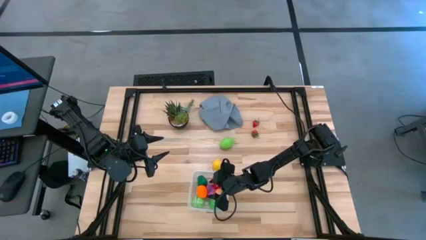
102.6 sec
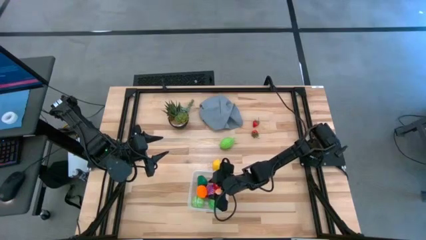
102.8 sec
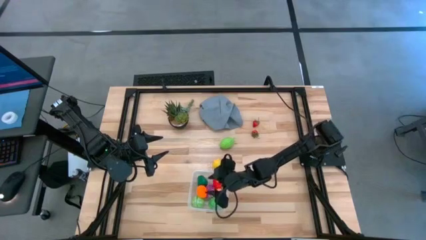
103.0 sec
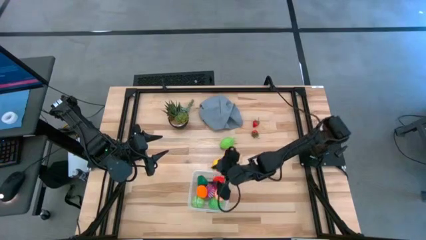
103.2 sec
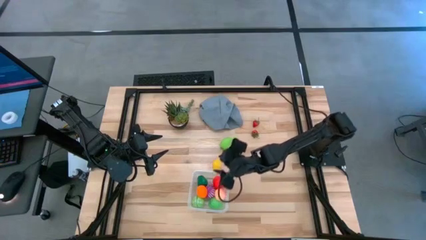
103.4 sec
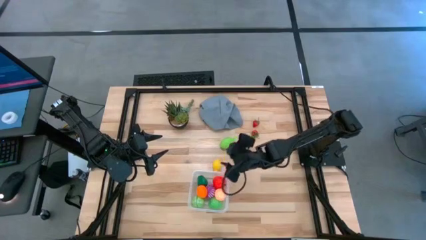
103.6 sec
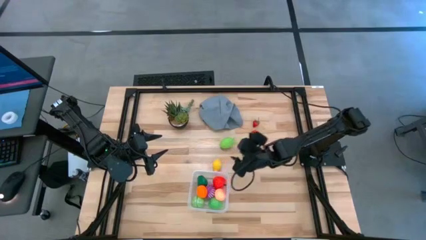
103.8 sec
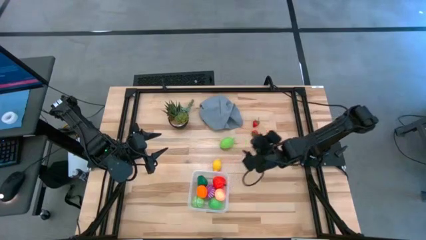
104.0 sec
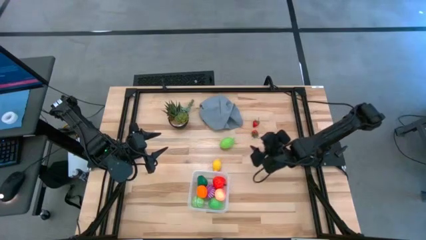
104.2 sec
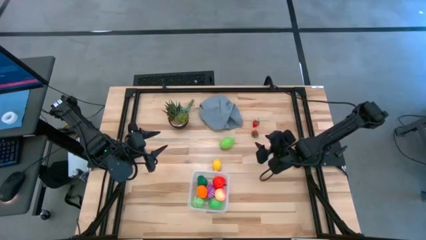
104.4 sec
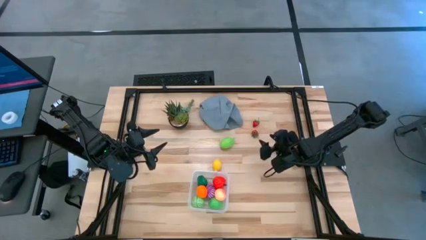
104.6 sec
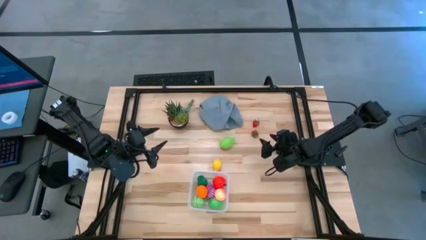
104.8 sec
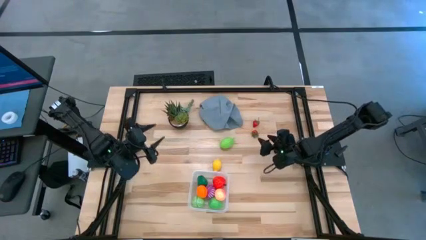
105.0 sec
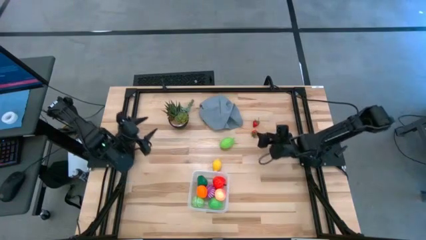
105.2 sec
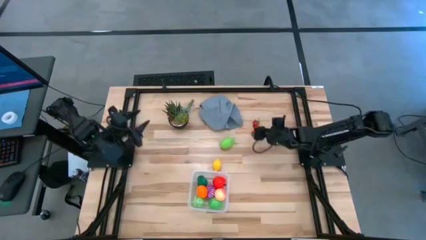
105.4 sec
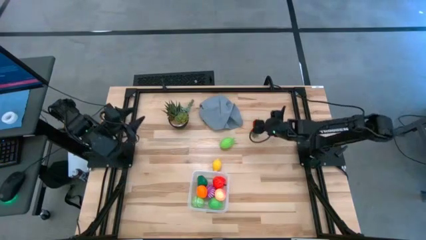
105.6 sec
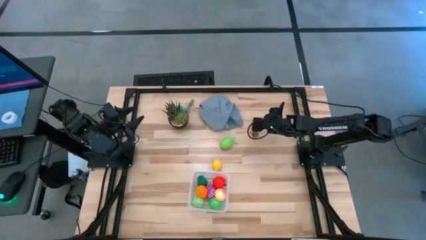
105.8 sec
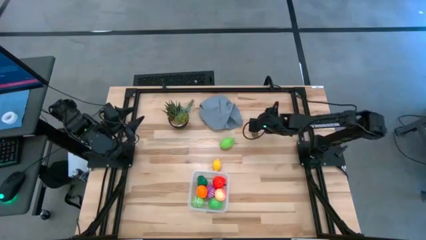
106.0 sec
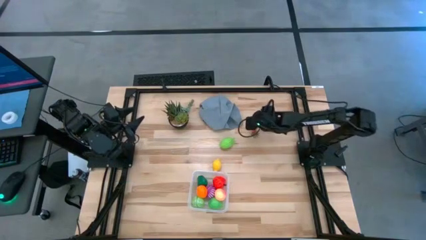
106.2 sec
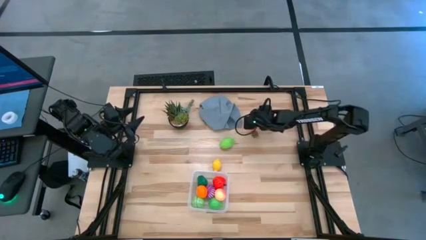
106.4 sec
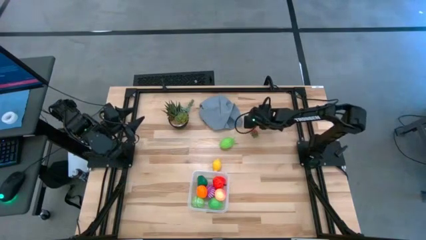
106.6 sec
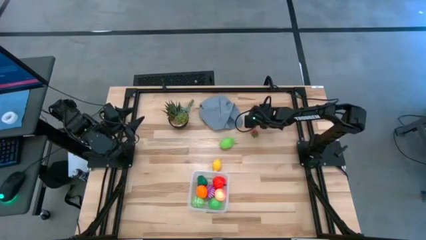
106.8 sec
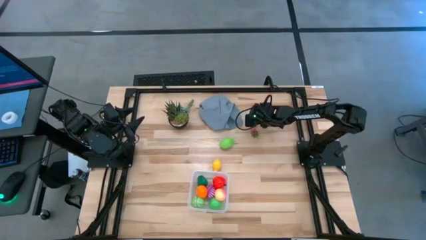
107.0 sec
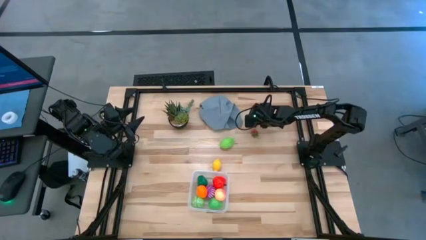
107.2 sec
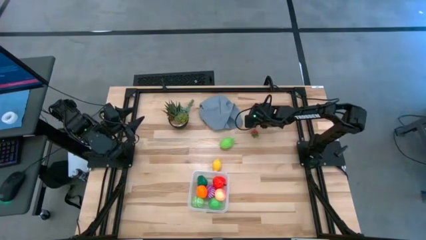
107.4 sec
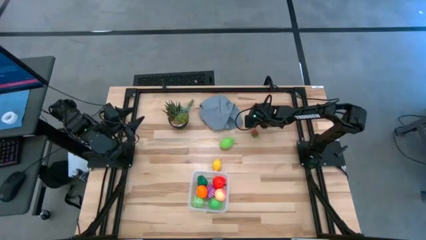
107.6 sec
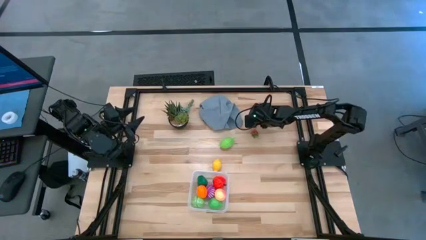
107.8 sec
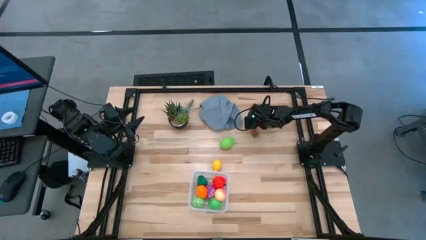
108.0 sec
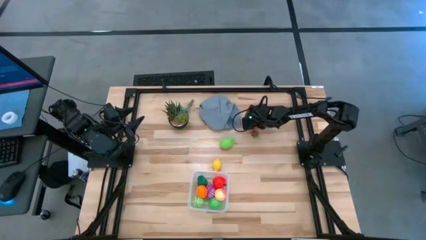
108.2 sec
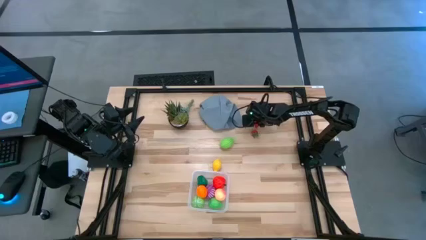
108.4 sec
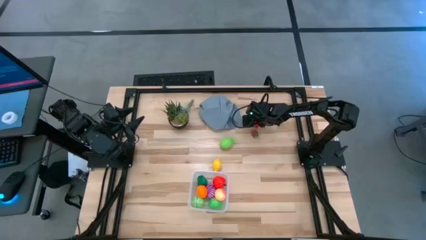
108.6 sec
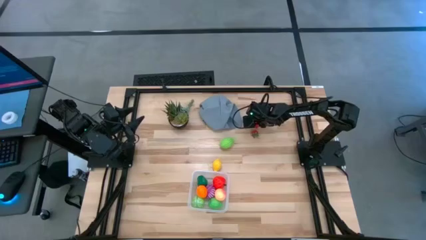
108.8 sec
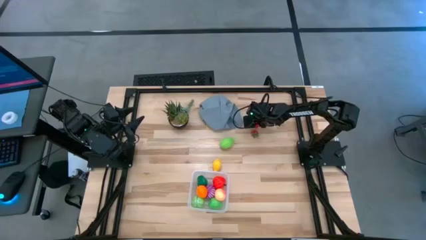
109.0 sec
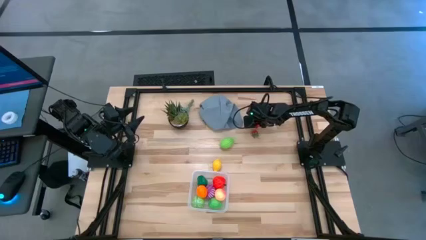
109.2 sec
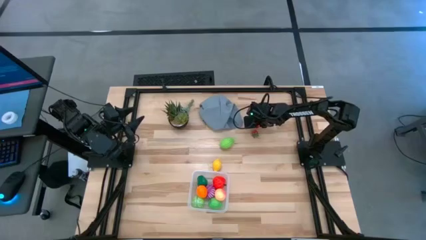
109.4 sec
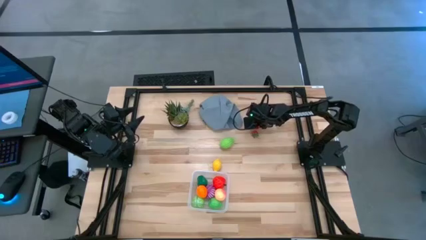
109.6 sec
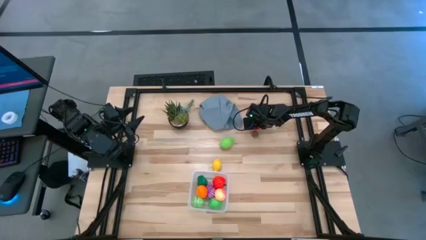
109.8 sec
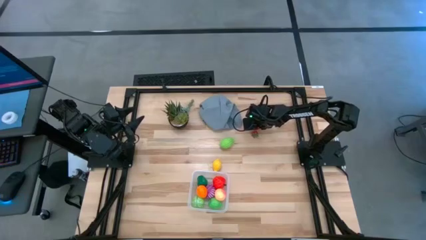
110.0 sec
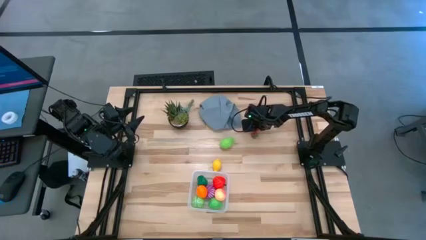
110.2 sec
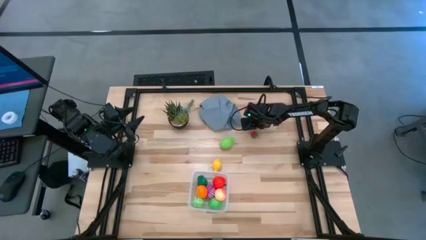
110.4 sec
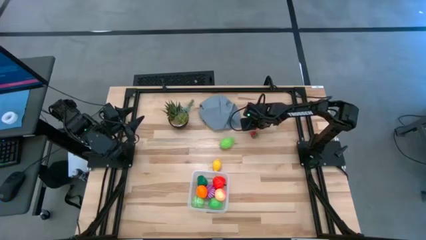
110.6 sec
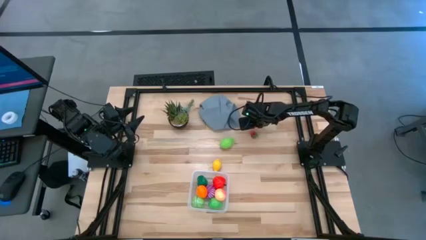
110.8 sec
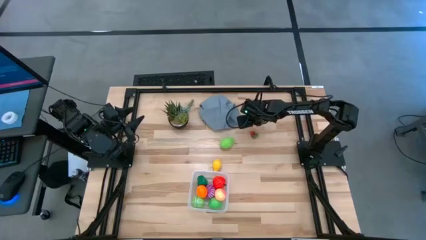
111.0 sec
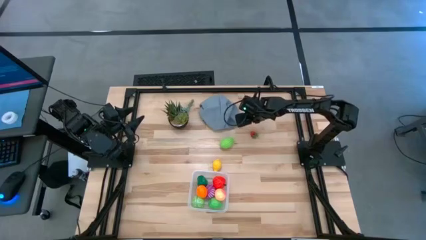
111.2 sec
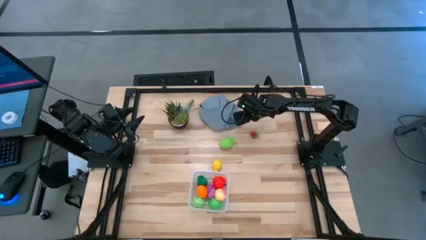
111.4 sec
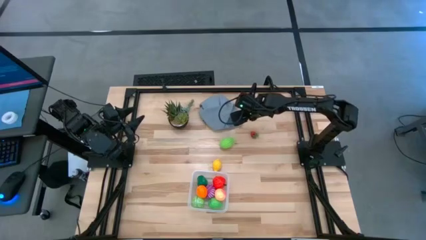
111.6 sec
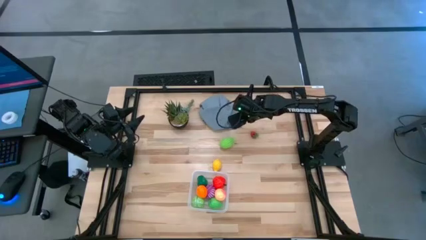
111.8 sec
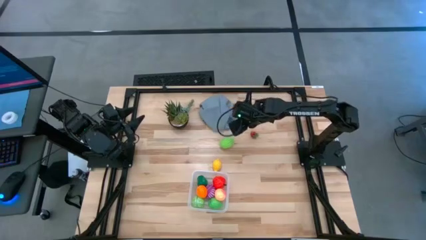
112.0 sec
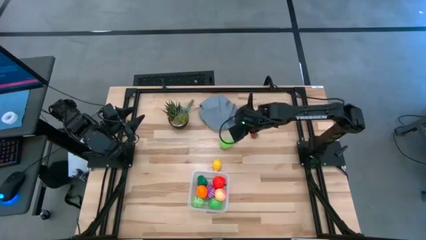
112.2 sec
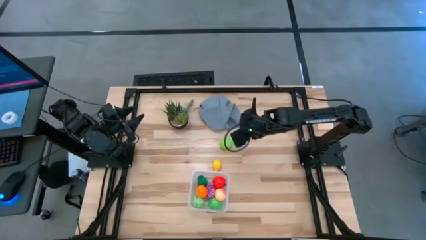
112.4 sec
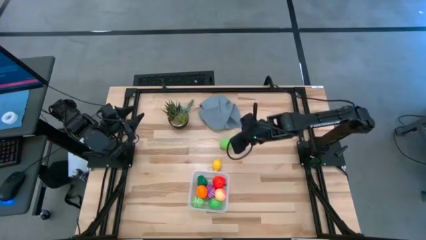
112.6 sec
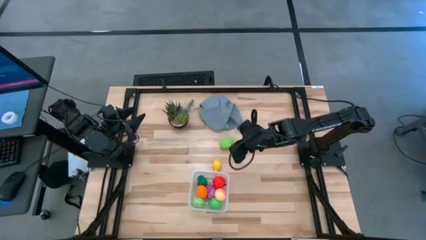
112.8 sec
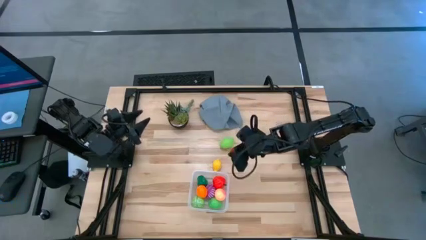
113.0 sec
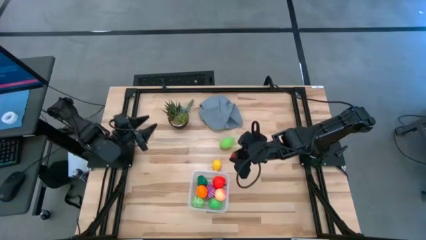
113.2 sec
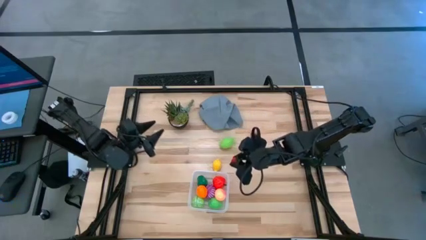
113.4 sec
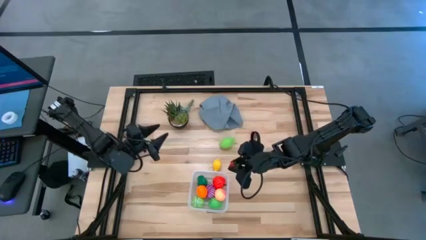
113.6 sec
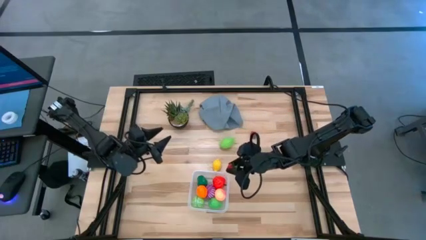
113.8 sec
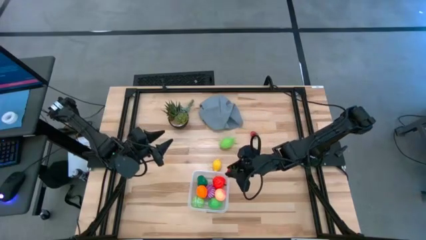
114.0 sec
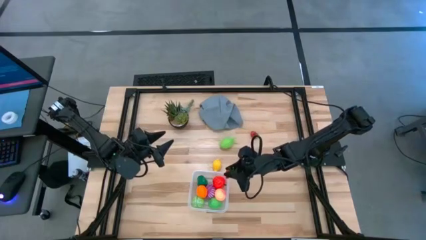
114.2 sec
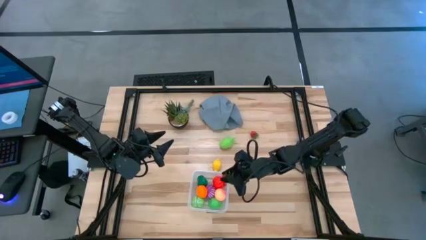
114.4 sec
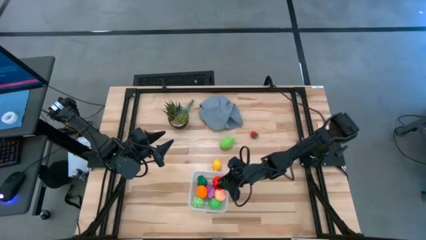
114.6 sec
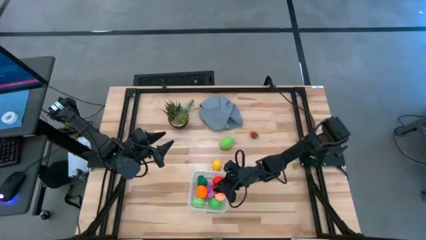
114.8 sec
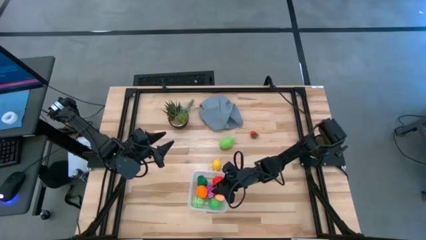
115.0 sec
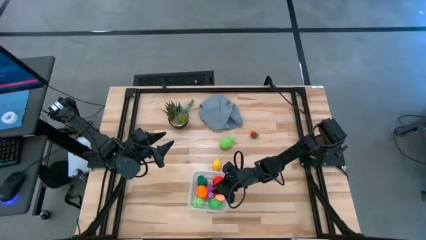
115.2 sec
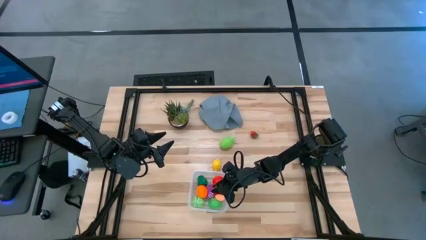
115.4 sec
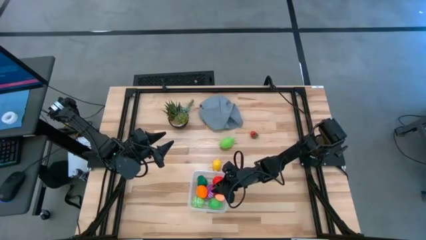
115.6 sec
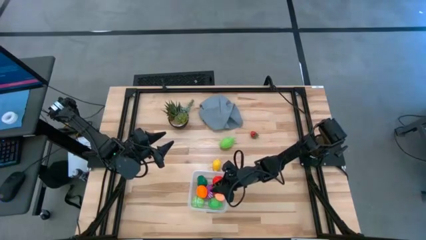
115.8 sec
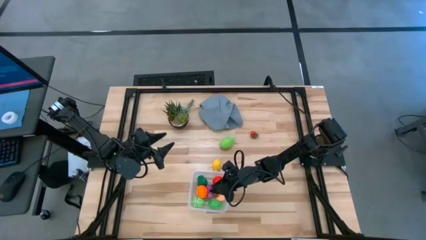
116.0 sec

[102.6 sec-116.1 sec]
Task: Pick and placing Produce into tupperware
Put the top red strawberry into the transparent bin
